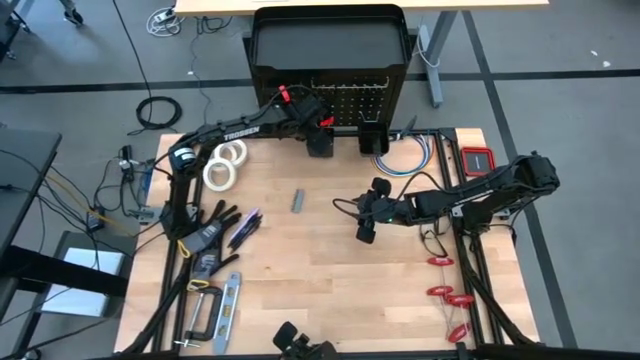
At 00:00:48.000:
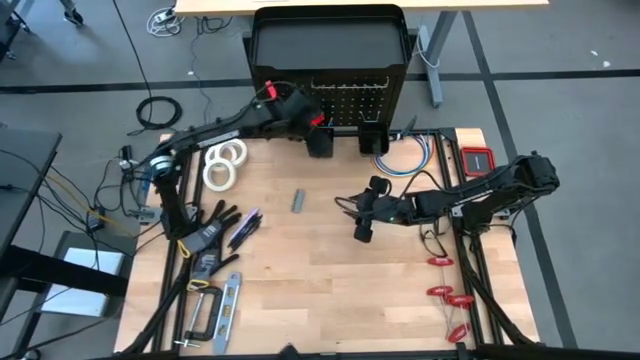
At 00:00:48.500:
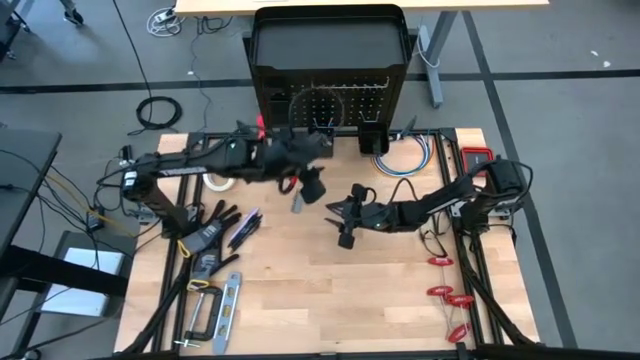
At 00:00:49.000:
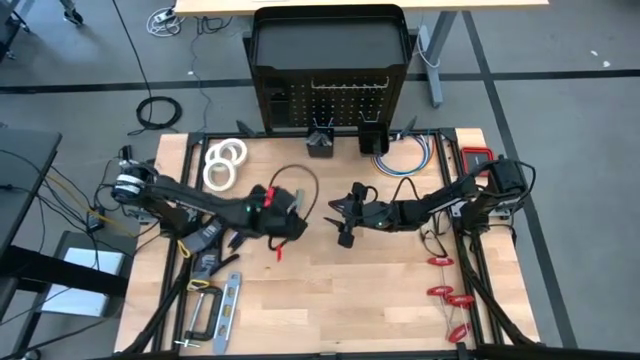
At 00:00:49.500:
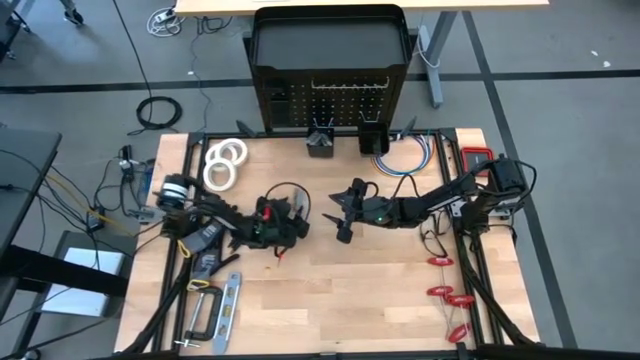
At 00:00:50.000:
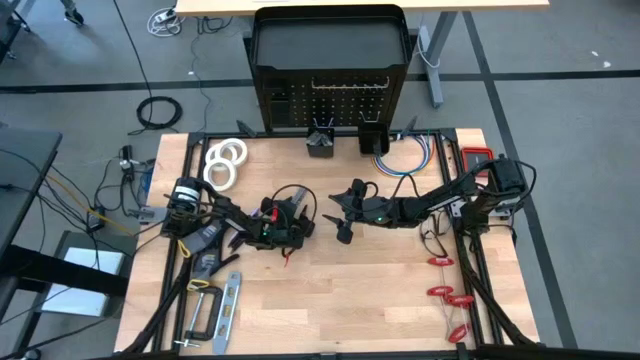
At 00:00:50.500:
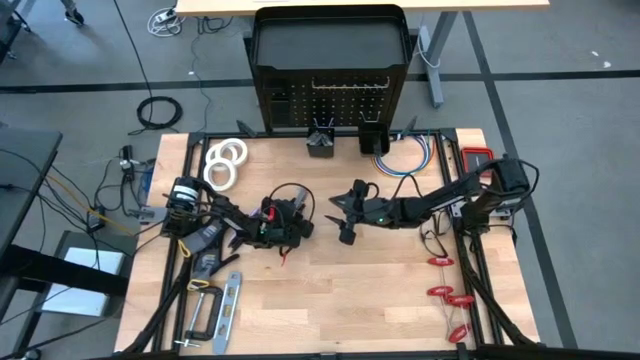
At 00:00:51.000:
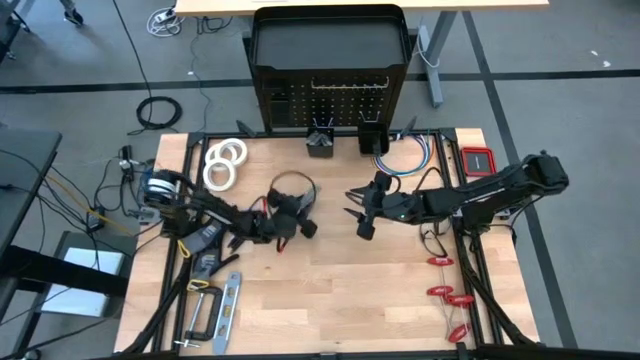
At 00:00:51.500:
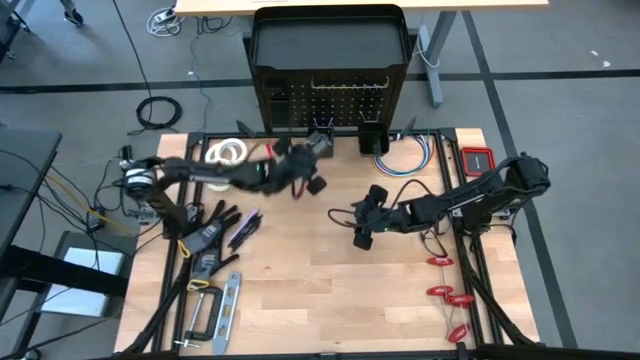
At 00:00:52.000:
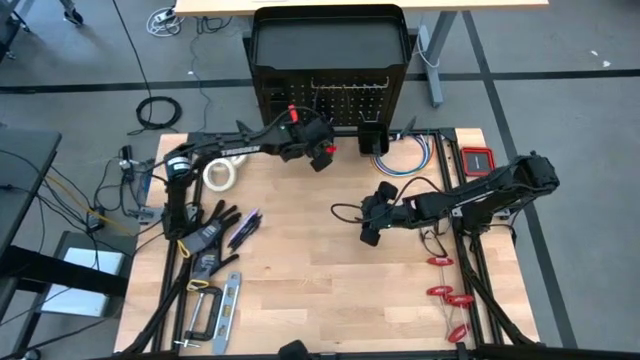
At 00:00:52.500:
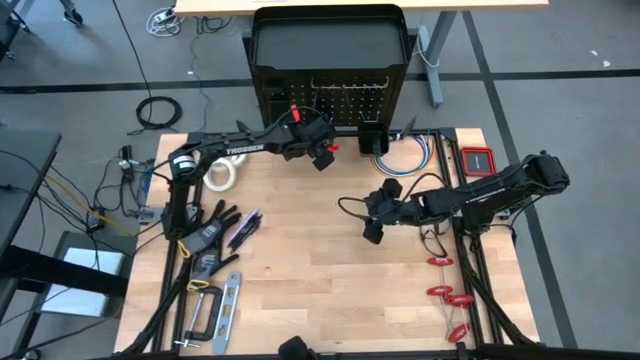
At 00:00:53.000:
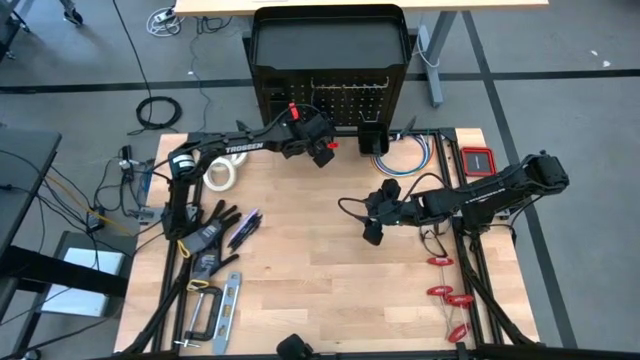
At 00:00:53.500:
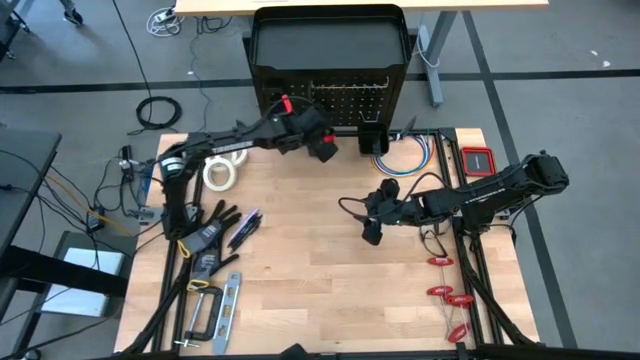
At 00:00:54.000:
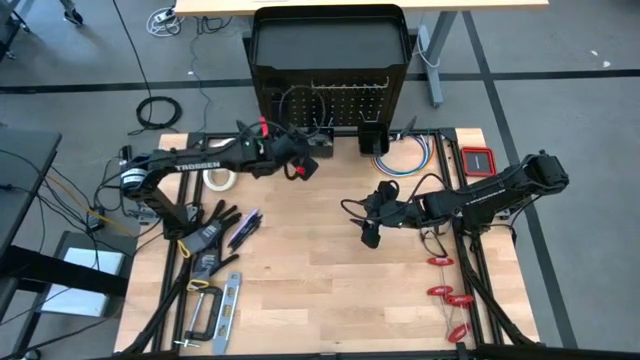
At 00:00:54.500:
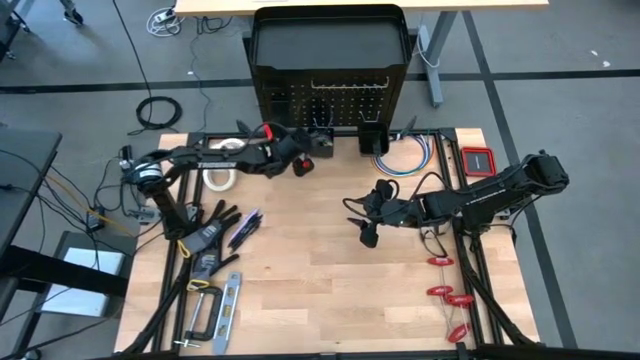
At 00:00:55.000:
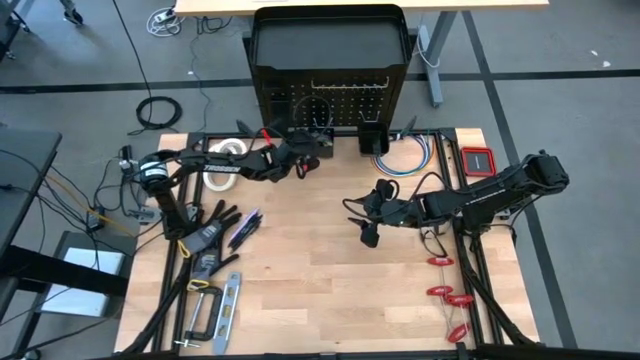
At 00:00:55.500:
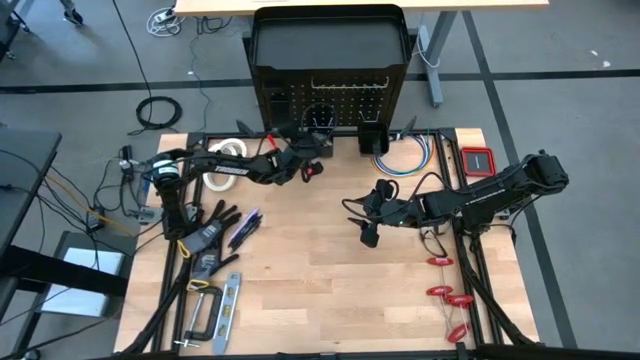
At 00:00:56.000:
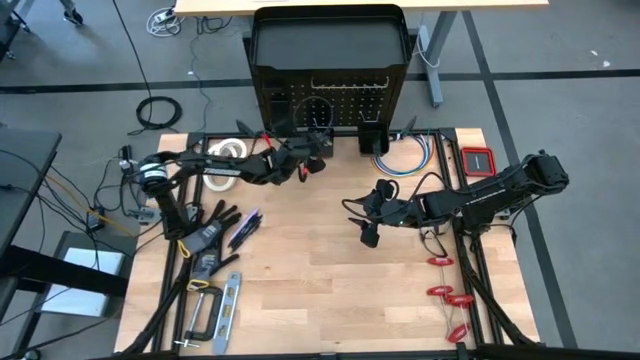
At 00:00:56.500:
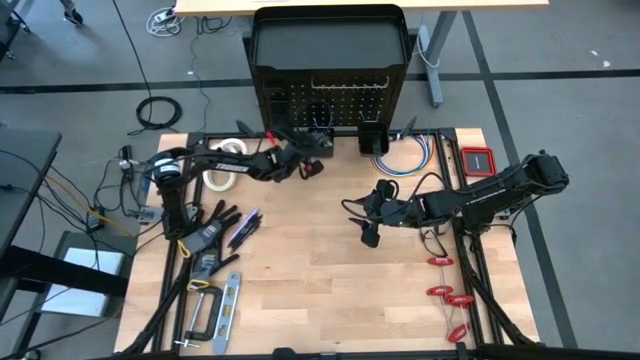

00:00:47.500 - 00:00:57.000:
Task: Hang tools onto peg board
Put the terminal block into the left peg board bin

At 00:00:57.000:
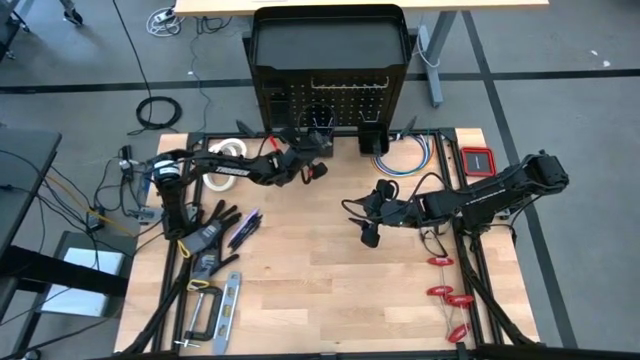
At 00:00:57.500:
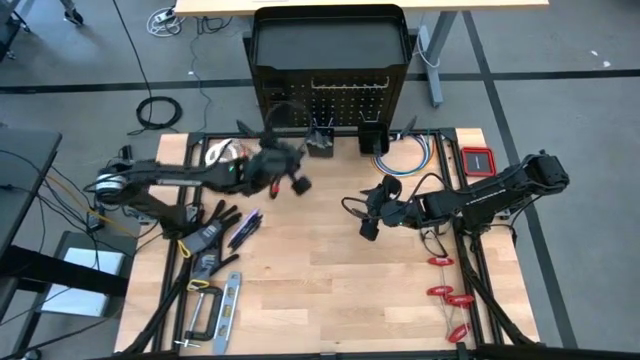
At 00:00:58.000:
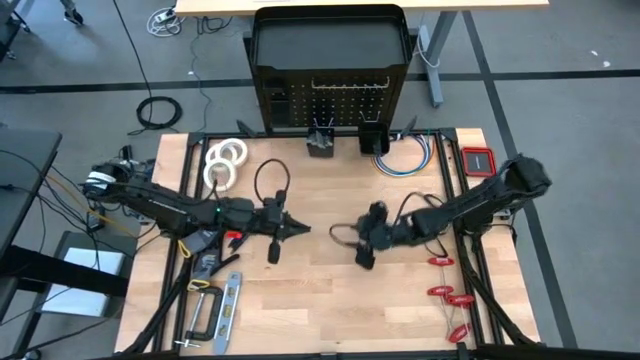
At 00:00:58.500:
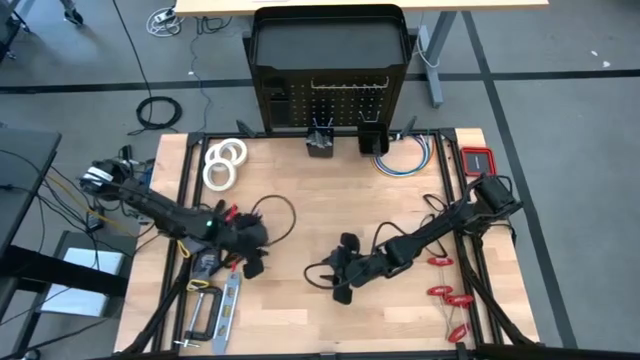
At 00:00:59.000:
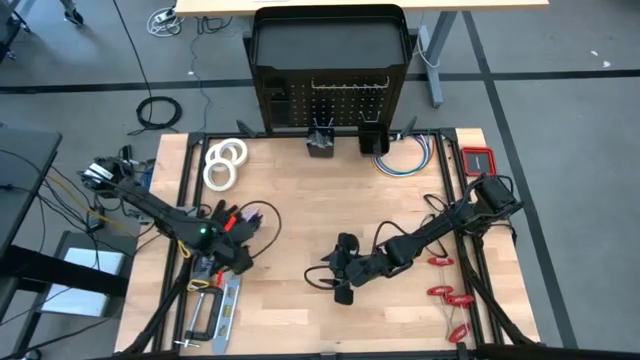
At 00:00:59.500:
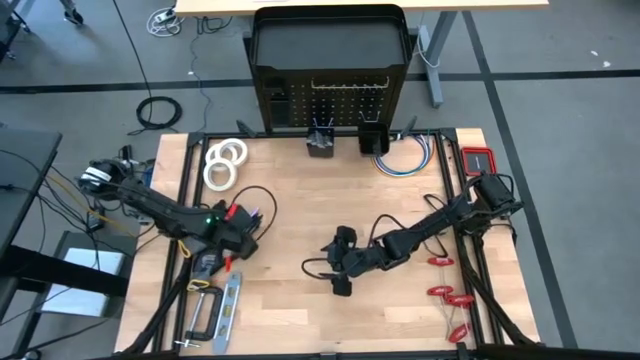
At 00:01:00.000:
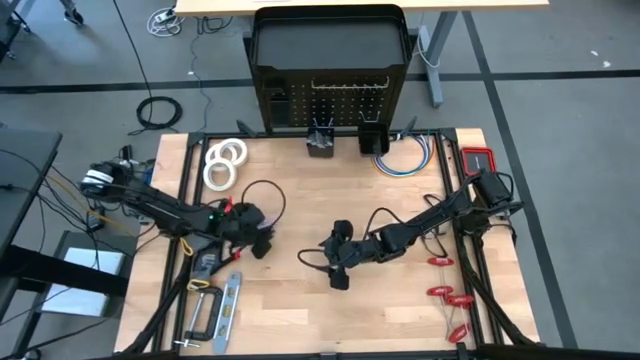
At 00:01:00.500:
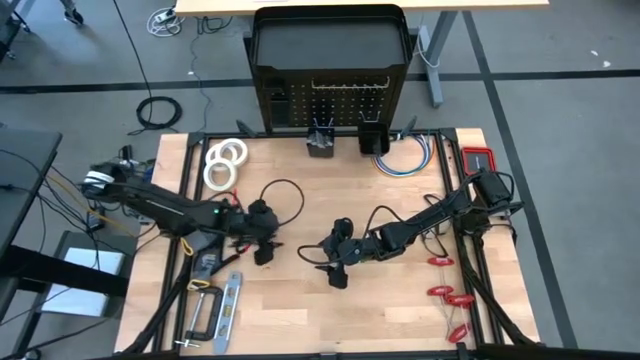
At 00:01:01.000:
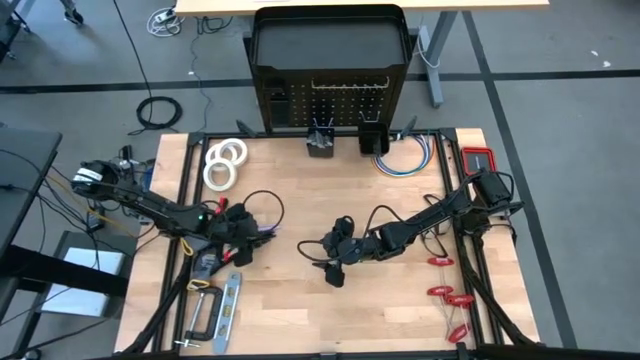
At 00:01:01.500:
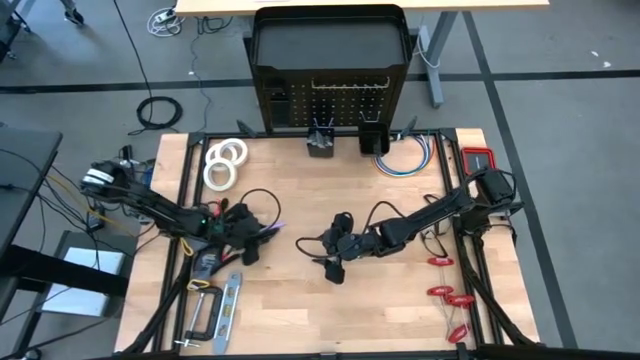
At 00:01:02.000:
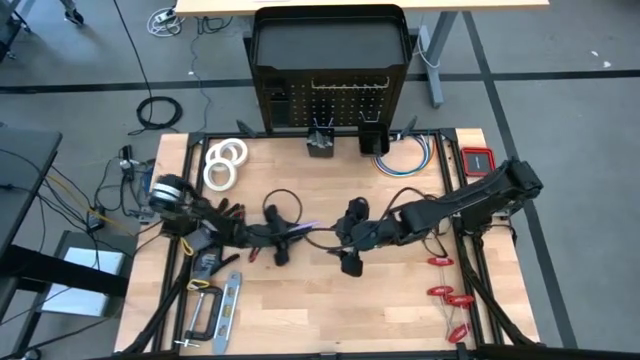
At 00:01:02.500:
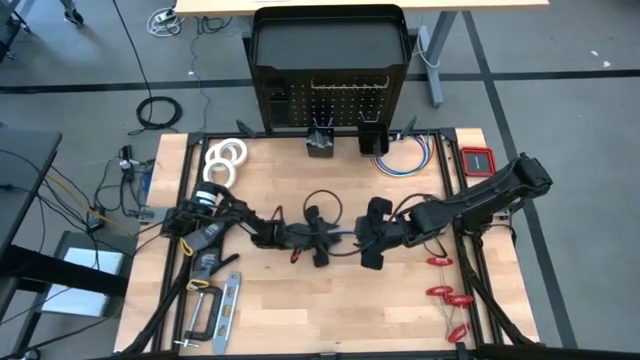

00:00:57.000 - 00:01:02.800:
Move the pens to the center of the table

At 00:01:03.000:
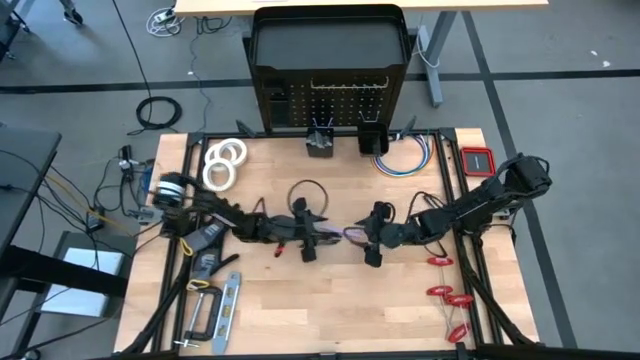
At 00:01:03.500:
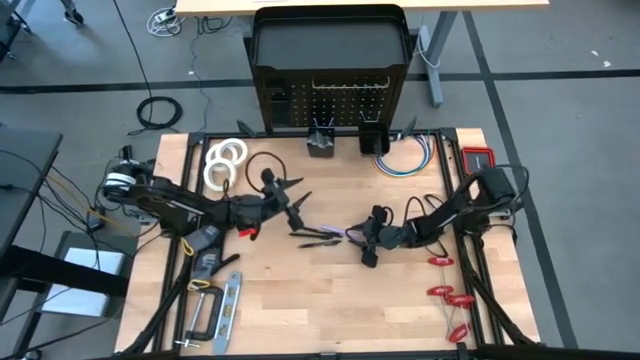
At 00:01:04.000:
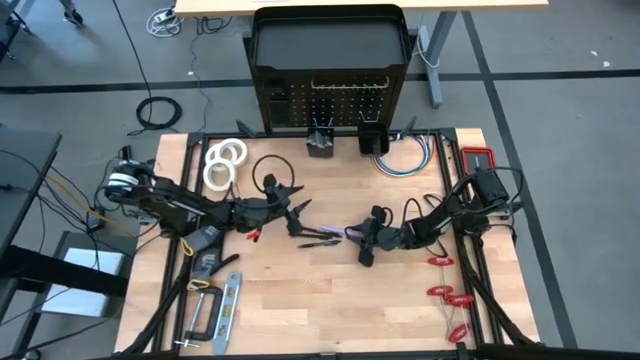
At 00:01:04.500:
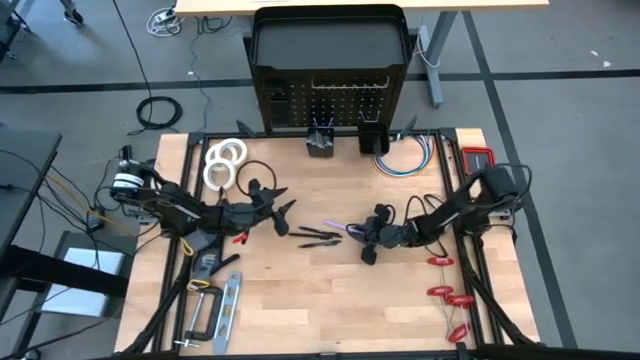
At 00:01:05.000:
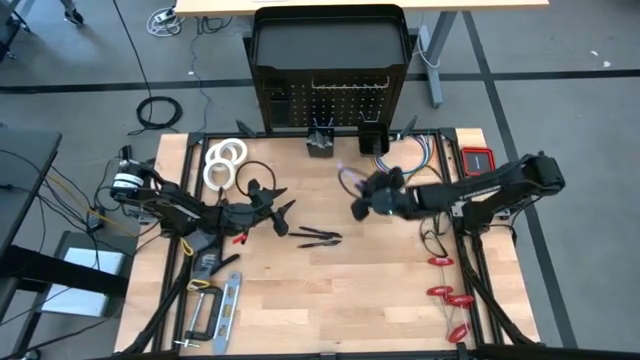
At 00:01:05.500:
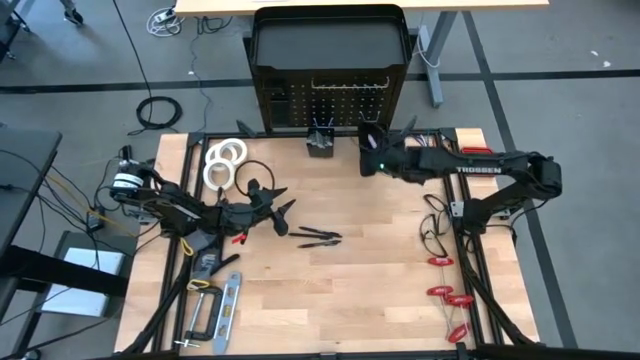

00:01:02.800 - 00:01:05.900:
Put the purple pen into the right peg board bin

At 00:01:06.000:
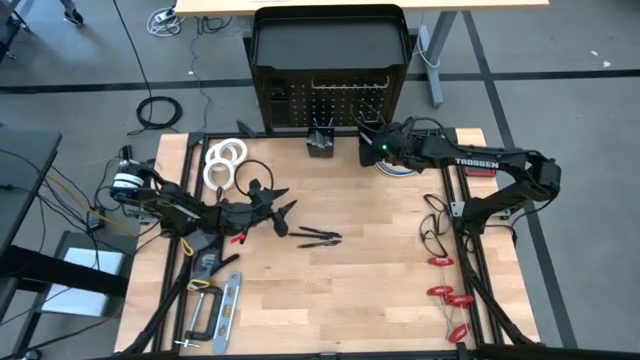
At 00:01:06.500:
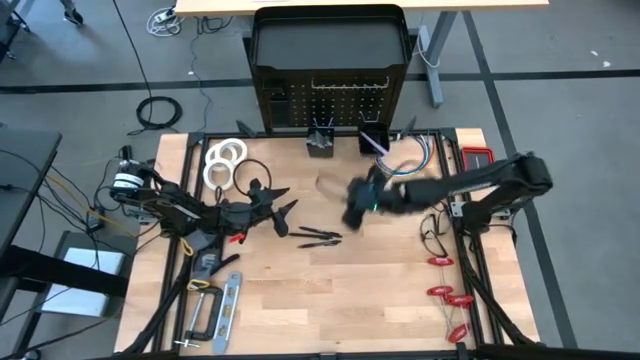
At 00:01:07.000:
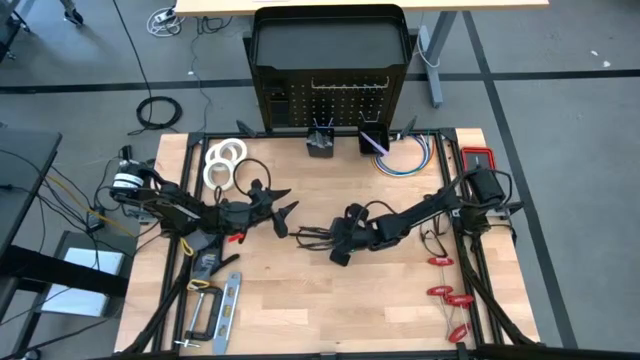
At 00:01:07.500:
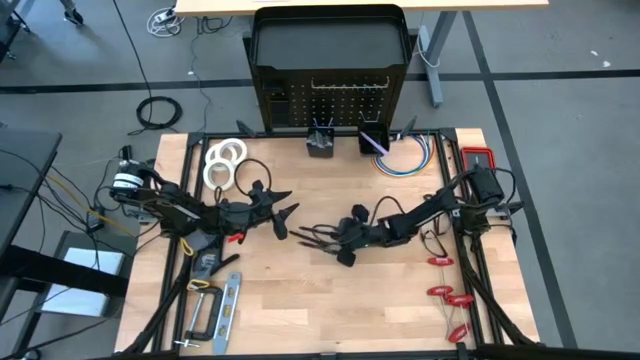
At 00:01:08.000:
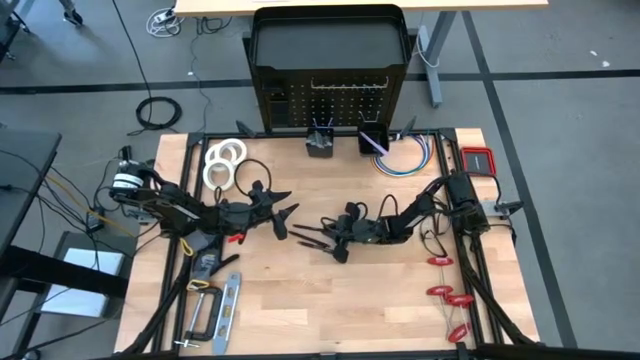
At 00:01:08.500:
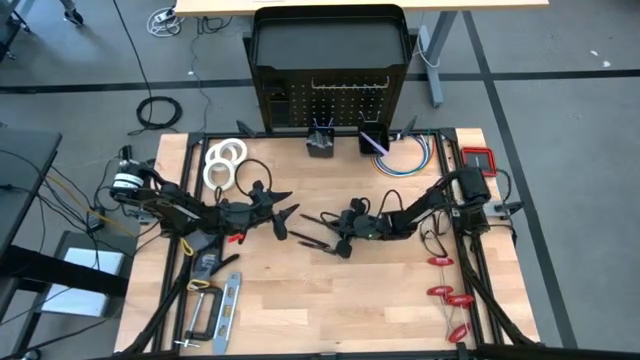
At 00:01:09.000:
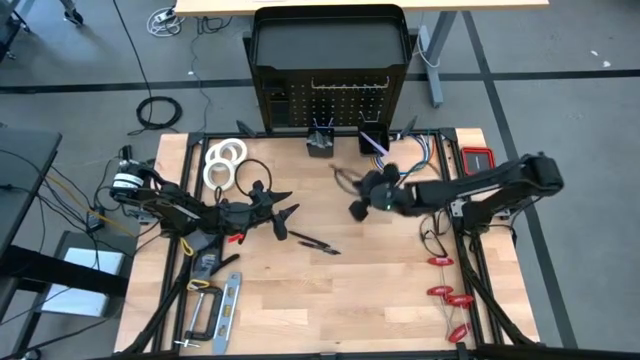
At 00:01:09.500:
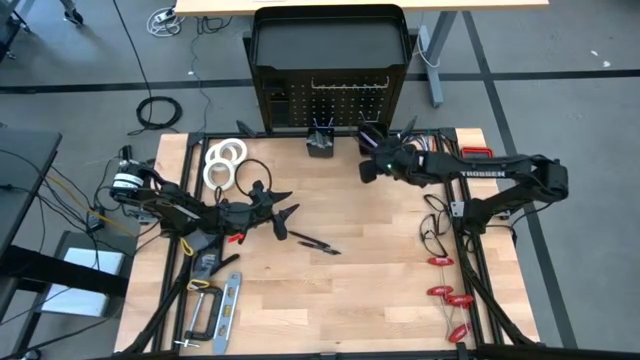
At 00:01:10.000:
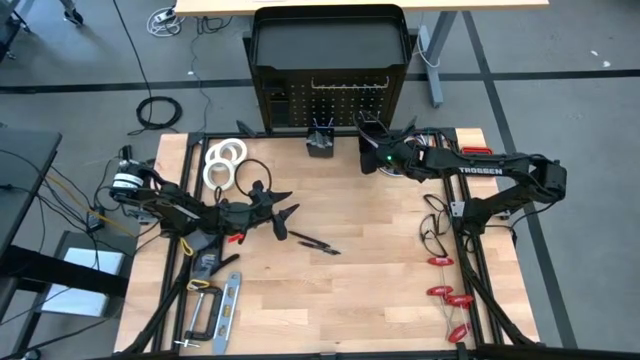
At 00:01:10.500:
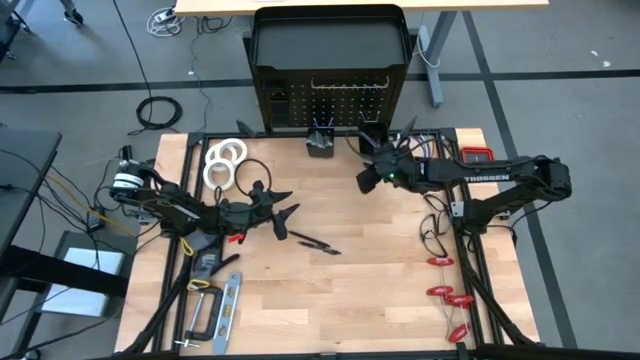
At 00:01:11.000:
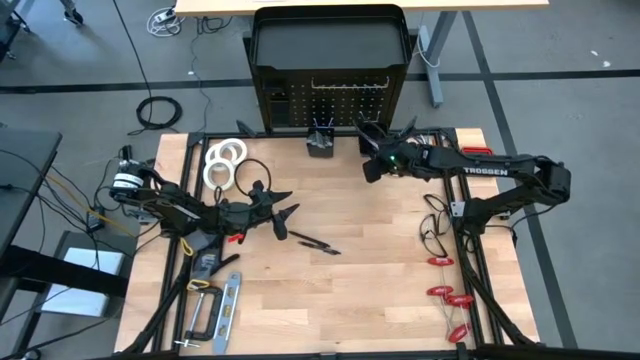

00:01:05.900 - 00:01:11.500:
Put the black pen into the right peg board bin
